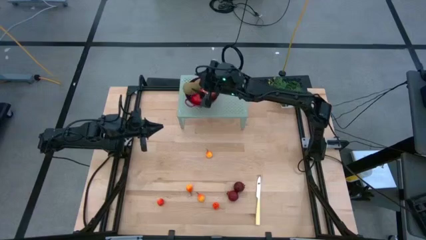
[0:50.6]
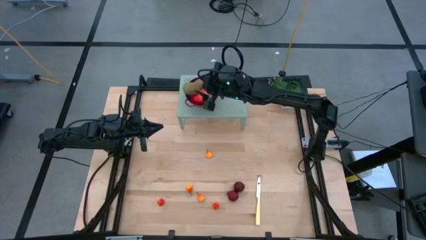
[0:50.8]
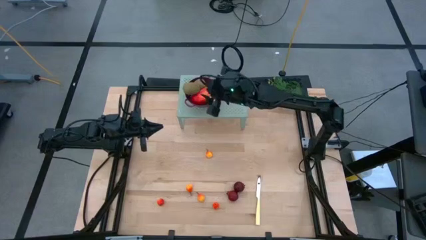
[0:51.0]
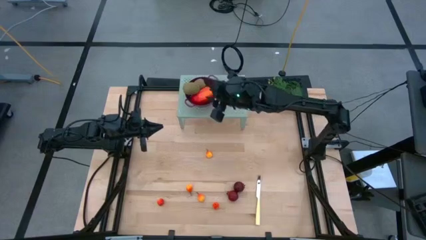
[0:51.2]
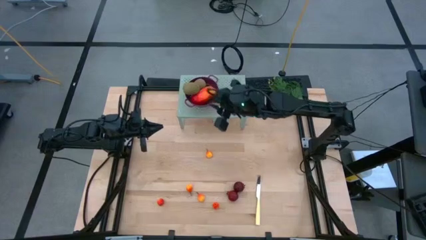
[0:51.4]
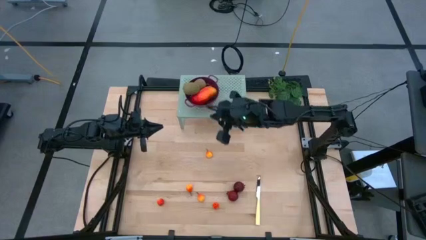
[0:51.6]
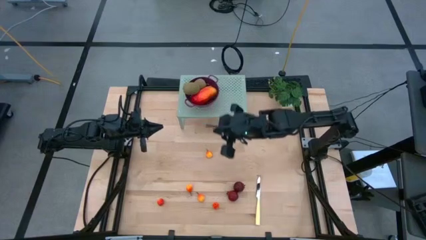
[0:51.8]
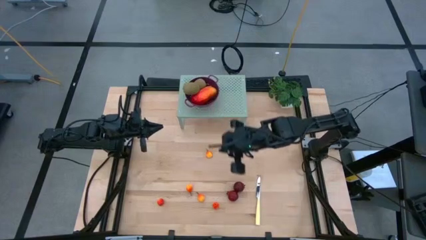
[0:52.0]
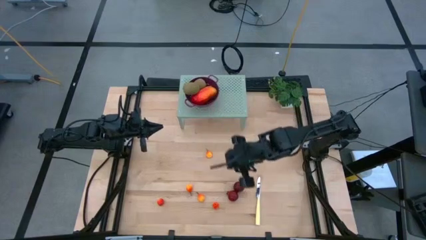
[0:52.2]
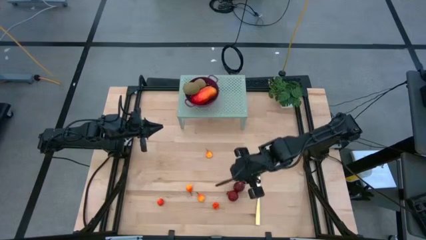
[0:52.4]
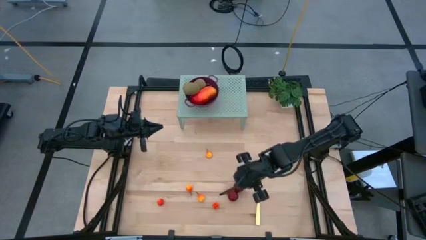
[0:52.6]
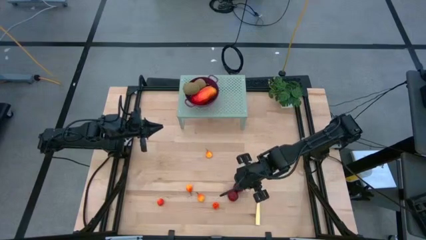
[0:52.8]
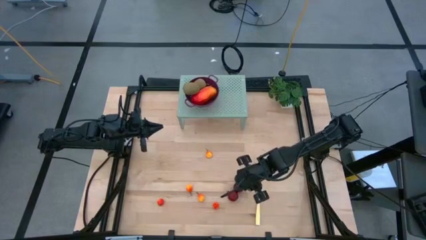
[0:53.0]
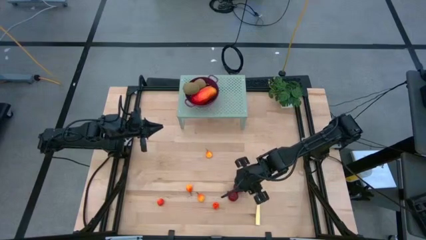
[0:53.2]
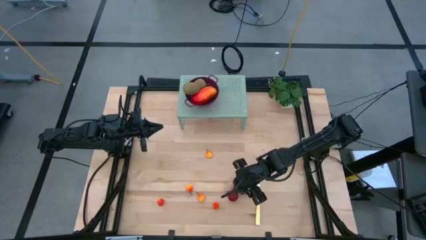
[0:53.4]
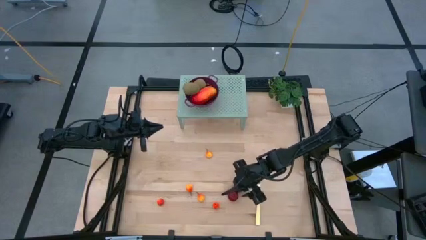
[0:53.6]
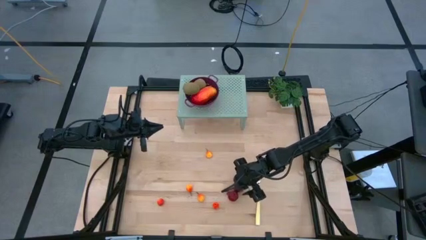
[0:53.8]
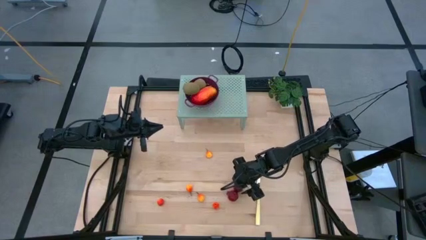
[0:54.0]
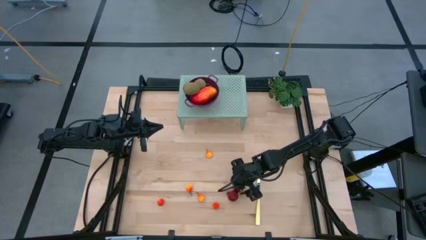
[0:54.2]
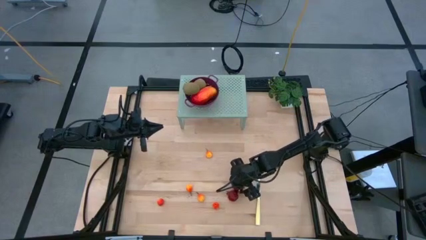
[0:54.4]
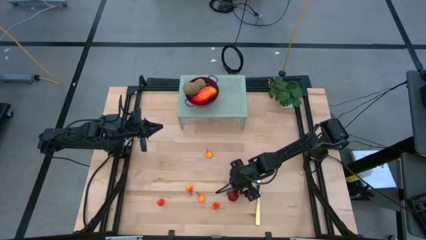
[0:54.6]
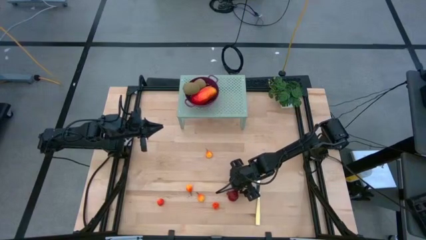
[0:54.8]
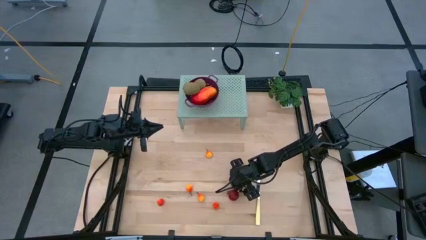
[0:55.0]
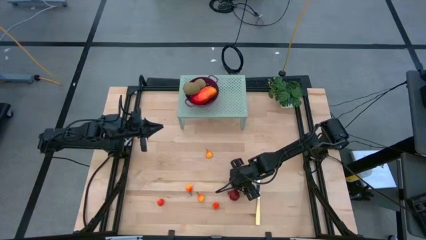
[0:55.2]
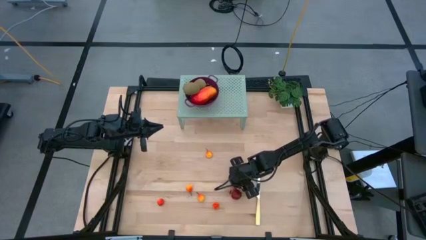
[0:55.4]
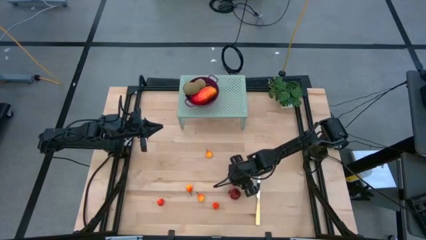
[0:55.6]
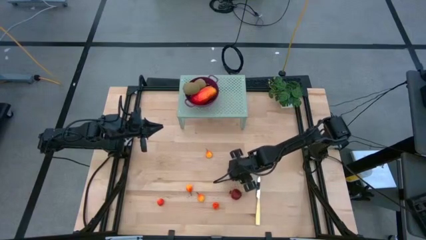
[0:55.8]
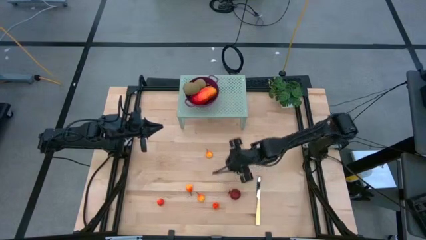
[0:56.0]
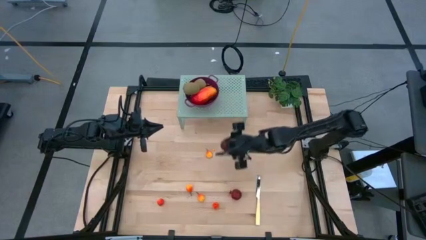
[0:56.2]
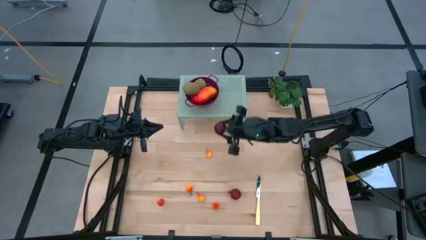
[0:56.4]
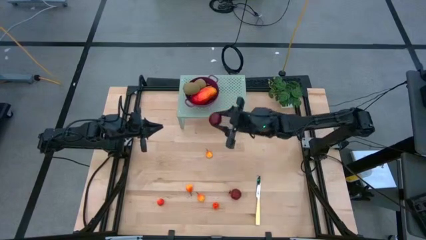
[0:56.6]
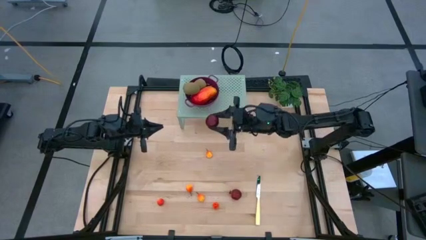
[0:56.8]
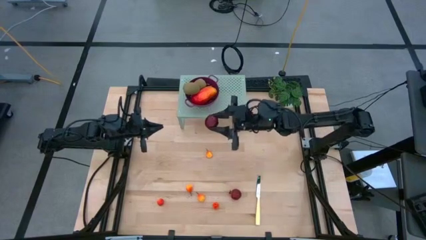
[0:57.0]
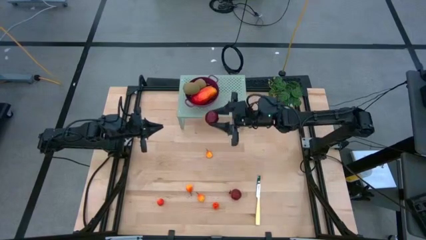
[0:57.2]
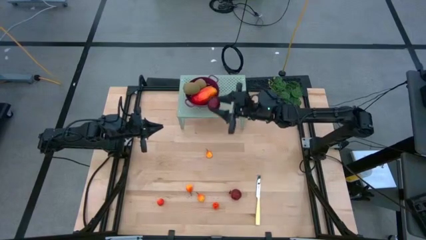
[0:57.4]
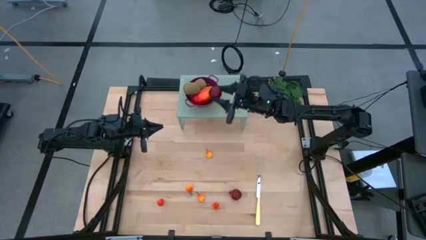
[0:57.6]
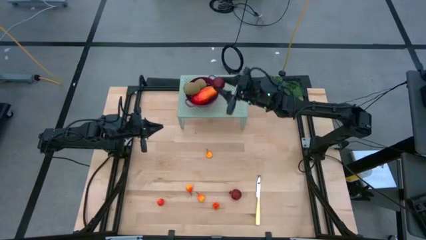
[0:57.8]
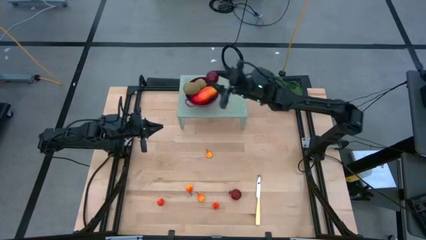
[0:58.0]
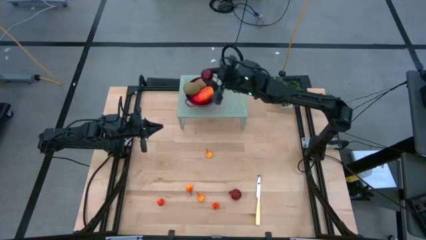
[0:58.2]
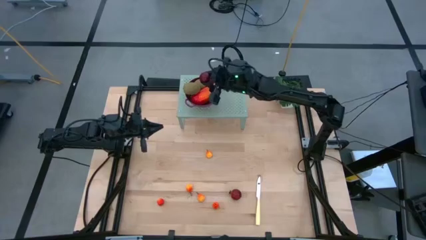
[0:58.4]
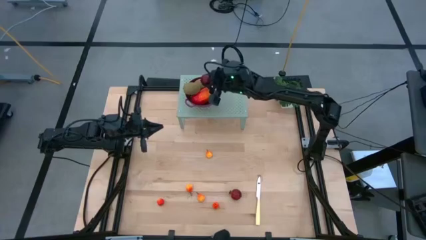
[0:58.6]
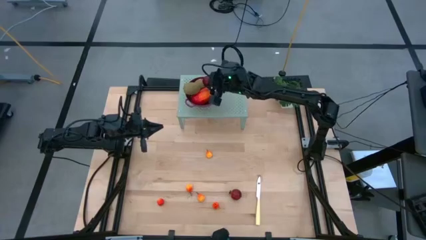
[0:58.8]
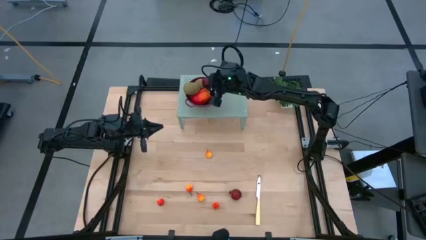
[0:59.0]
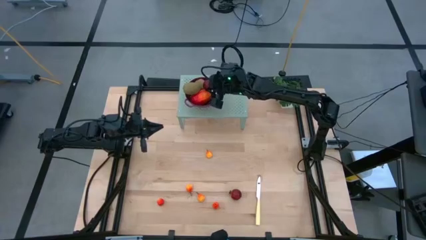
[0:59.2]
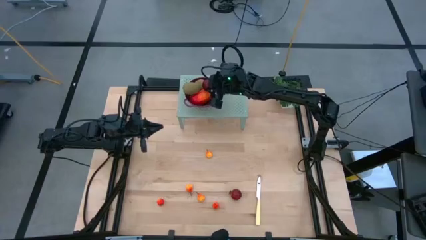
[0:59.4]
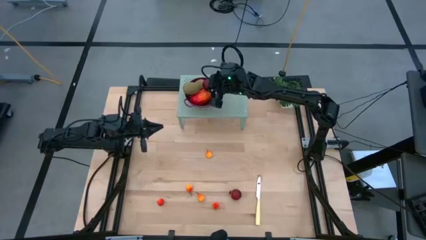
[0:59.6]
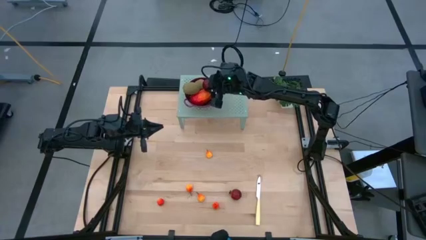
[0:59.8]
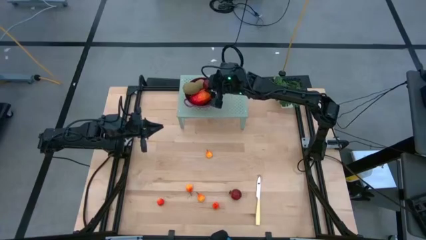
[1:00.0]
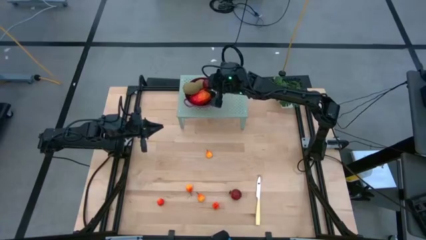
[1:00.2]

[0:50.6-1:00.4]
Task: Pick & Place Fruit
Put the red pomegranate in the red strainer bowl on the shelf
